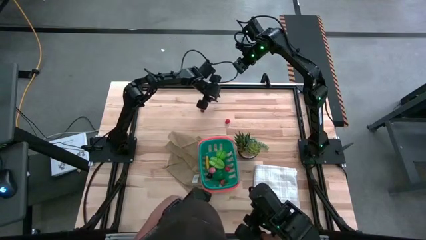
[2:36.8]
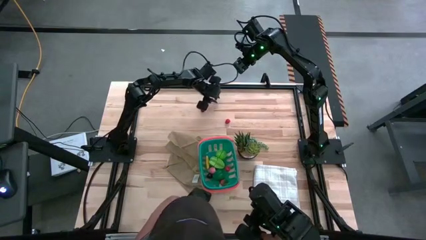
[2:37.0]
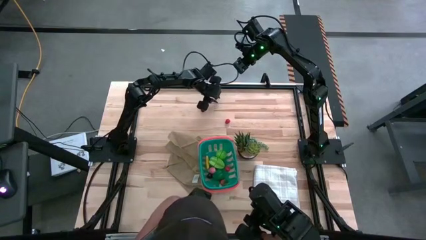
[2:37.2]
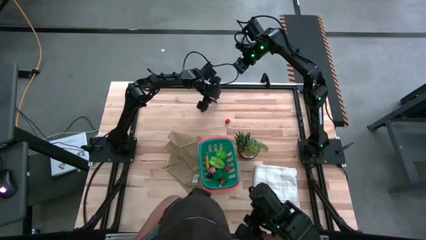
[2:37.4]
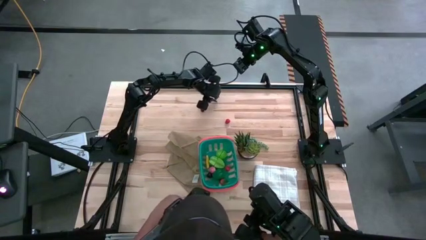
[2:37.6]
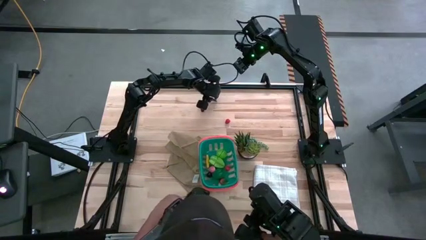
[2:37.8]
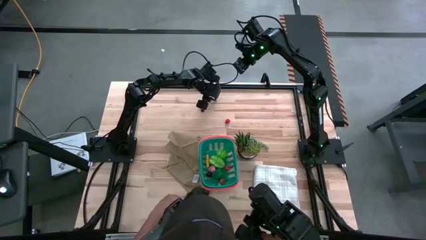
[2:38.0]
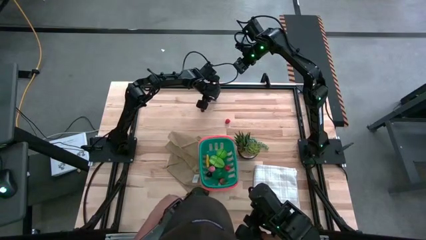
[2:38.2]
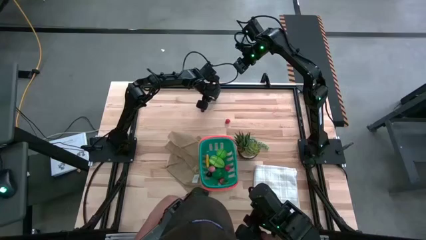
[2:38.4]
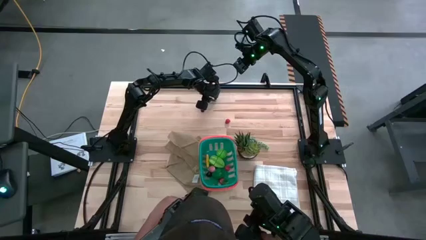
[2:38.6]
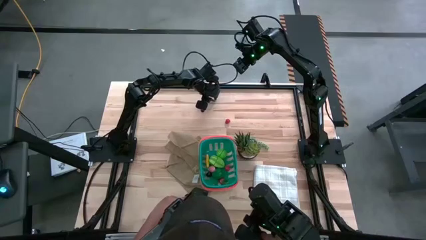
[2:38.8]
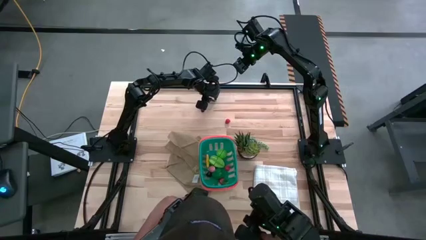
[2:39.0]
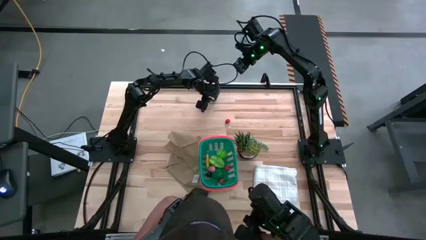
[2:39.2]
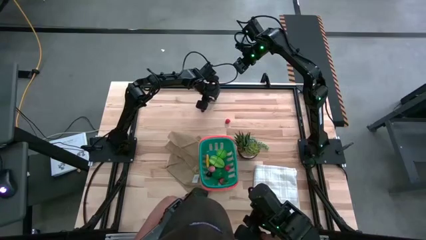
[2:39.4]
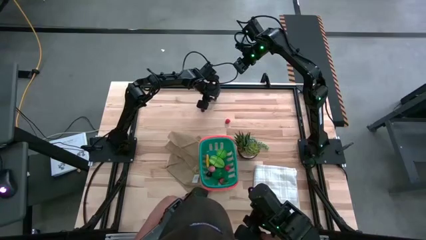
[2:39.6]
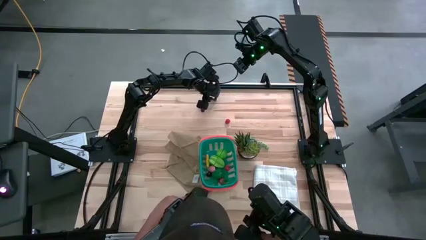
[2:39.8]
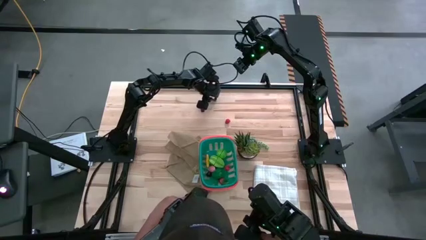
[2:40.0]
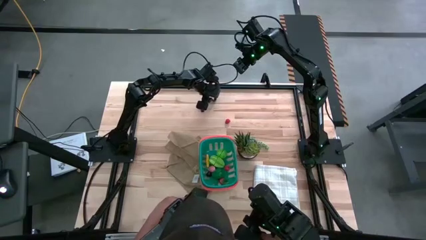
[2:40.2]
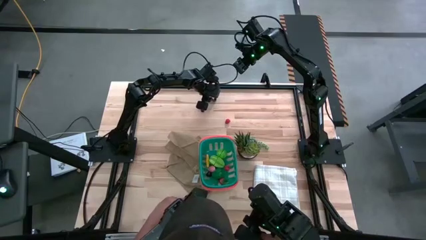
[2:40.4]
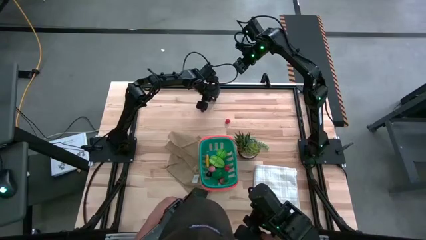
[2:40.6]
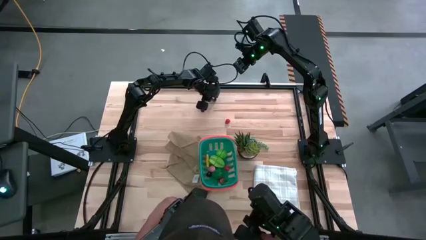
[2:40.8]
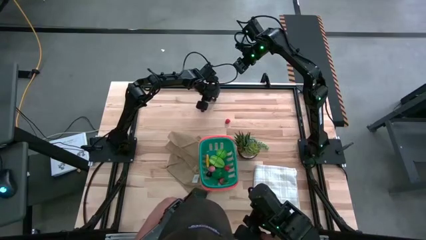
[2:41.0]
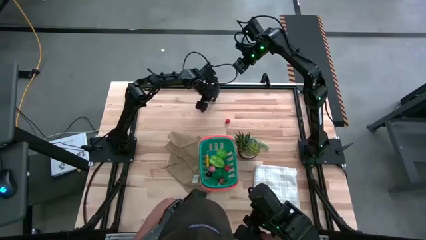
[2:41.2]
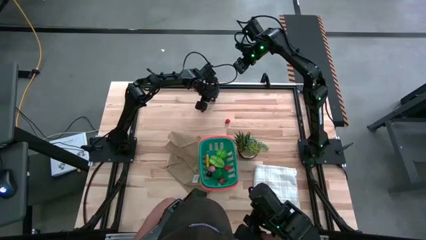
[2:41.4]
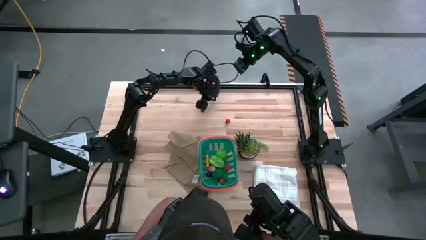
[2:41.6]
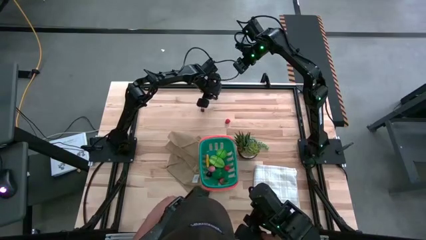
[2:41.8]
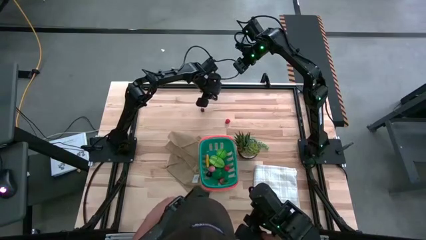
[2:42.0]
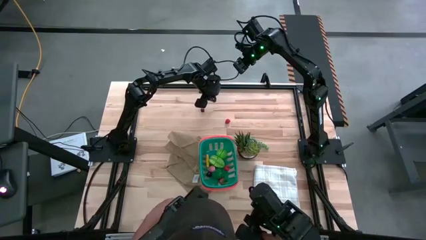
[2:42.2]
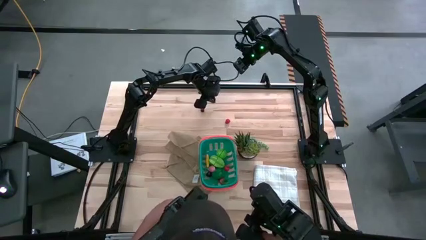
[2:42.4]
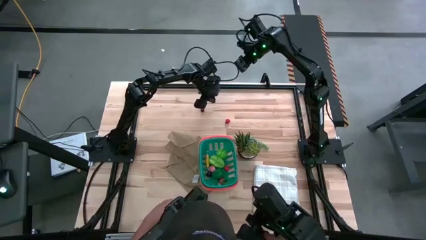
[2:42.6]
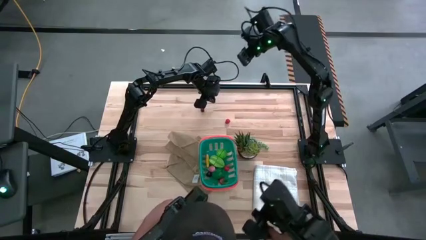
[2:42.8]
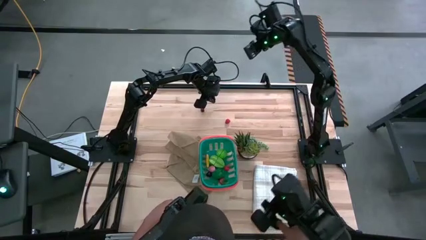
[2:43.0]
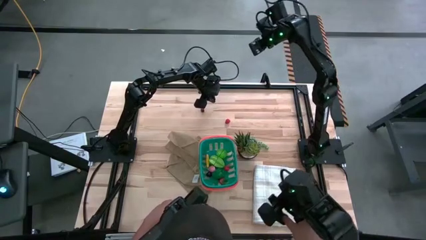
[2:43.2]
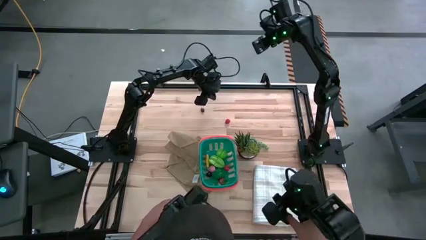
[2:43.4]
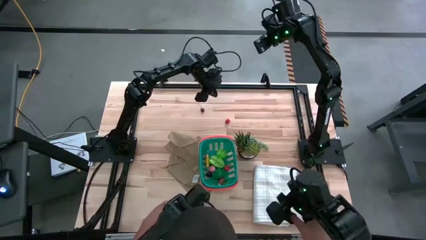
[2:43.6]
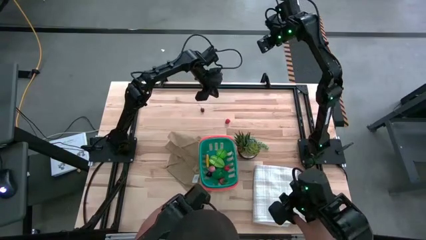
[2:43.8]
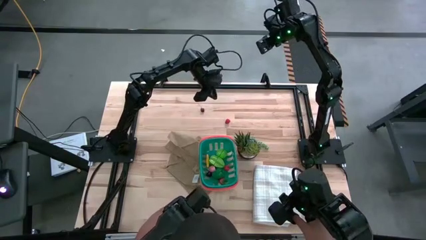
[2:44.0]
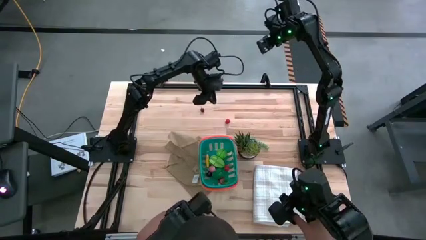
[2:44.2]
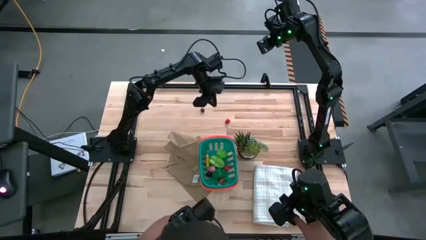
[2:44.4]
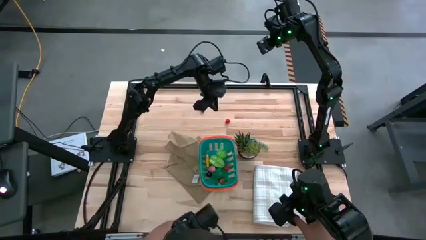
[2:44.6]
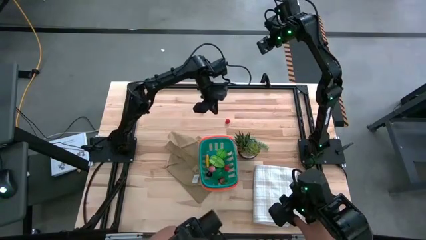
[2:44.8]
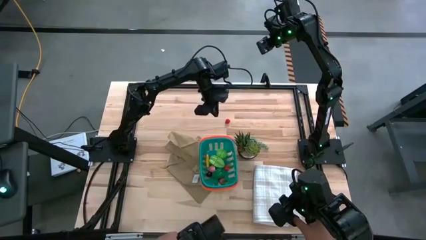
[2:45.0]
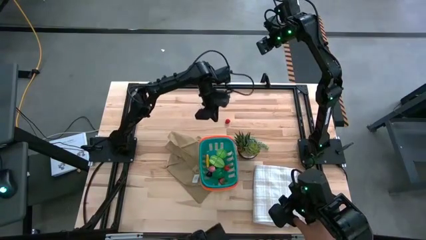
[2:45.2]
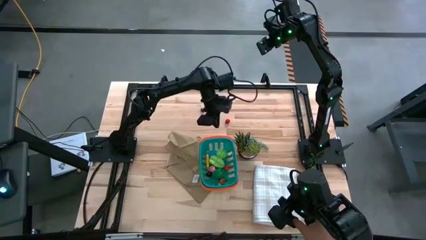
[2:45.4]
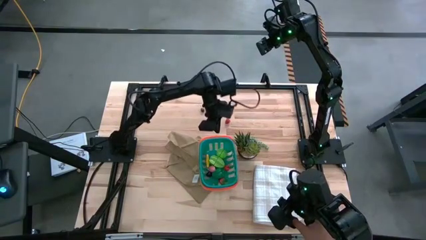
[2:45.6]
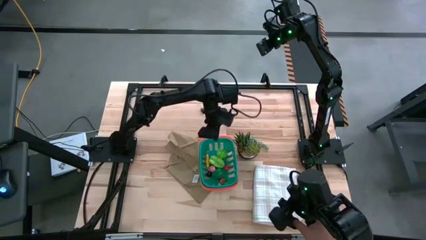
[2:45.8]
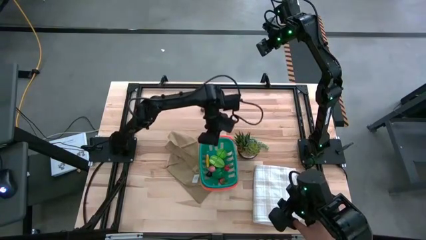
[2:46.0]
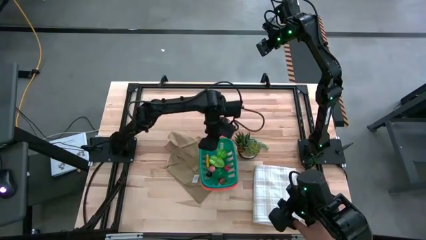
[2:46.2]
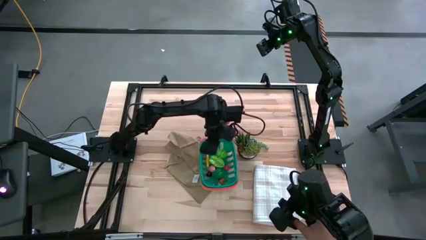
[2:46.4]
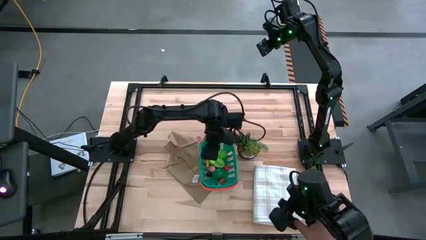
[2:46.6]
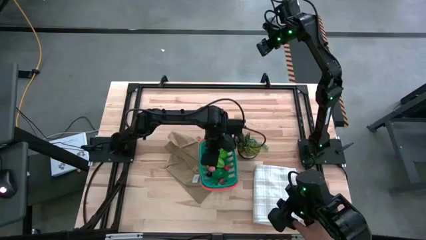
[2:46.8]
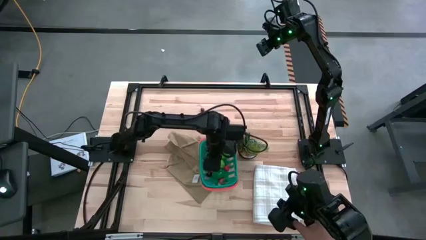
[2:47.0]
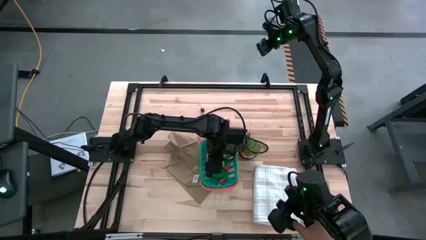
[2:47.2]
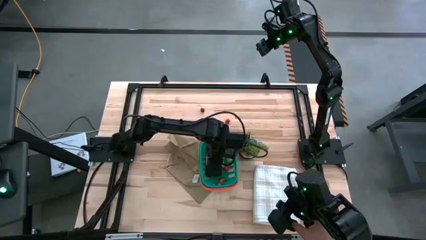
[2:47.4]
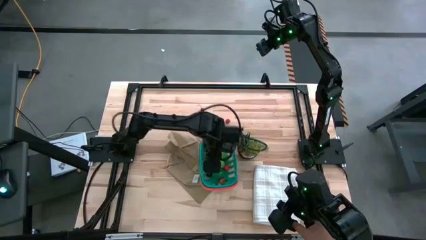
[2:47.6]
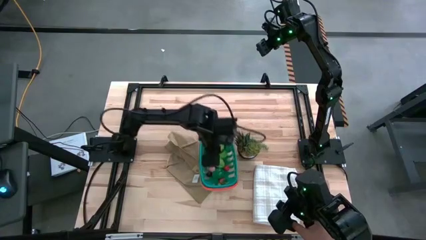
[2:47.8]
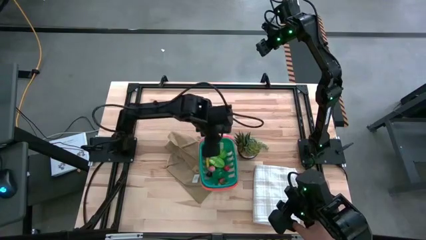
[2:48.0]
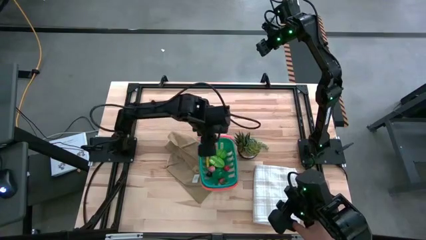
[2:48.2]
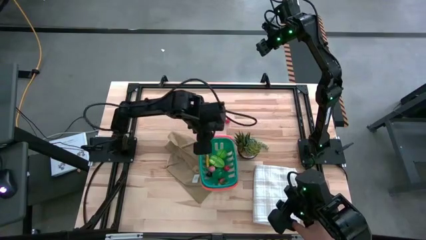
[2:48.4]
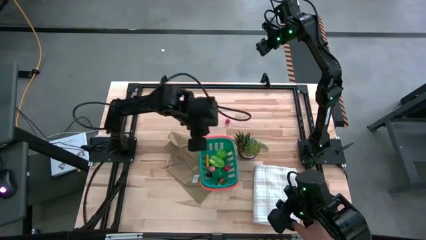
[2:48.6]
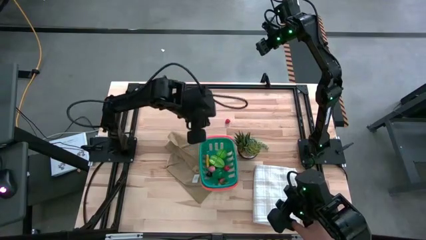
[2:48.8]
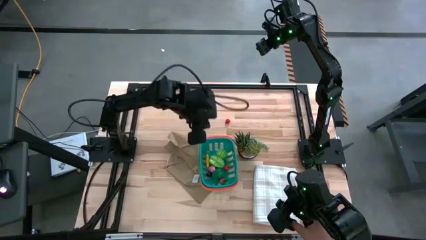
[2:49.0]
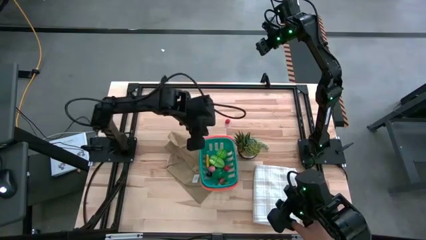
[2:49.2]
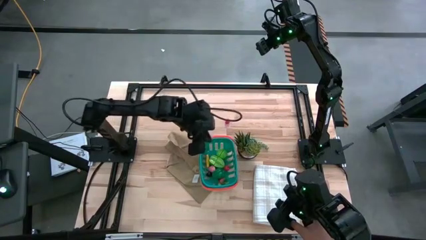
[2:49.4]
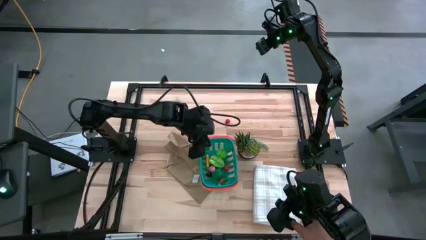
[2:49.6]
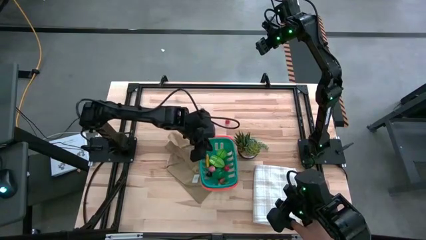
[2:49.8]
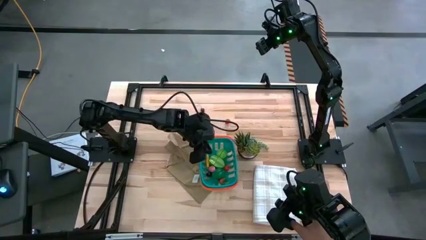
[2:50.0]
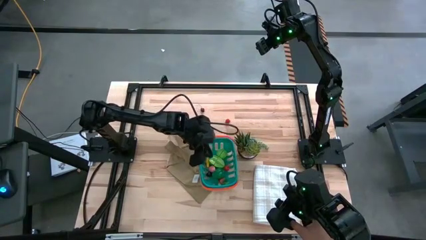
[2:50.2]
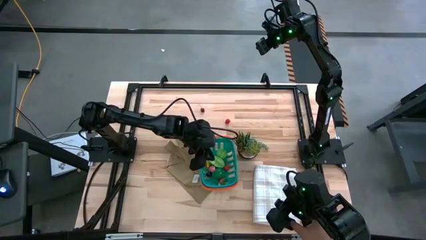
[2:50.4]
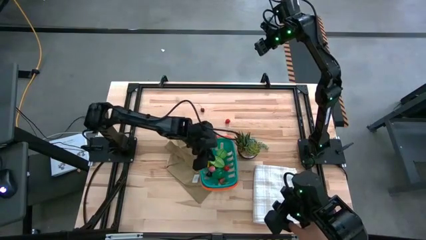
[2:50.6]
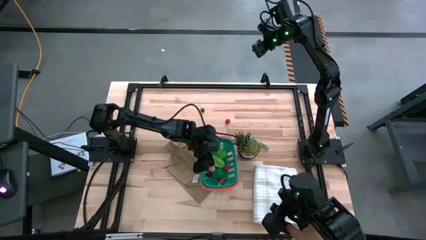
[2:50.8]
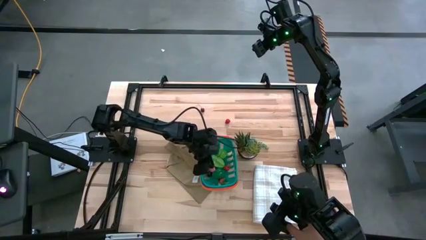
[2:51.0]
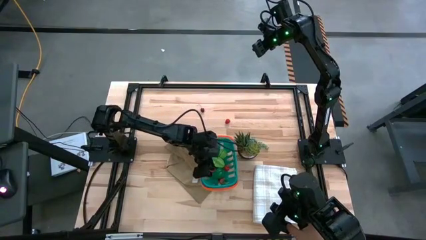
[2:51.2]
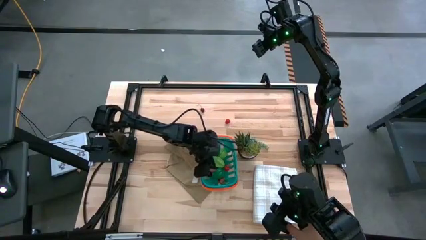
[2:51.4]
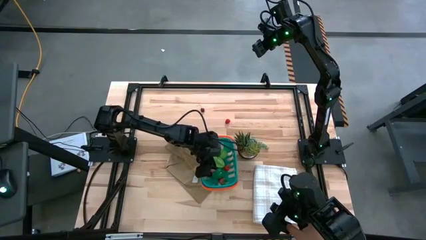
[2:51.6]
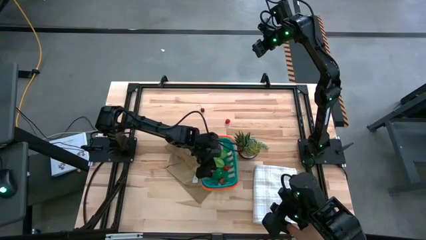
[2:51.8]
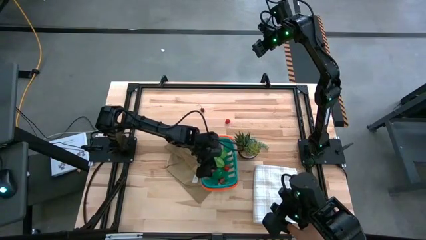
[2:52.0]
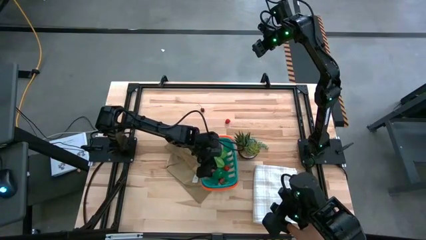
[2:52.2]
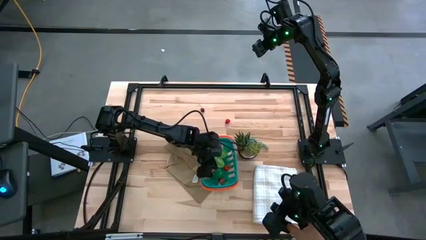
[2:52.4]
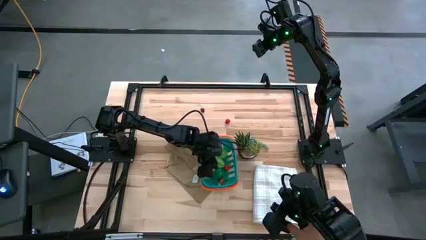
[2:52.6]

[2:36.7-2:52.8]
Task: Pick and placing Produce into tupperware
Put the blueberry into the green basket
